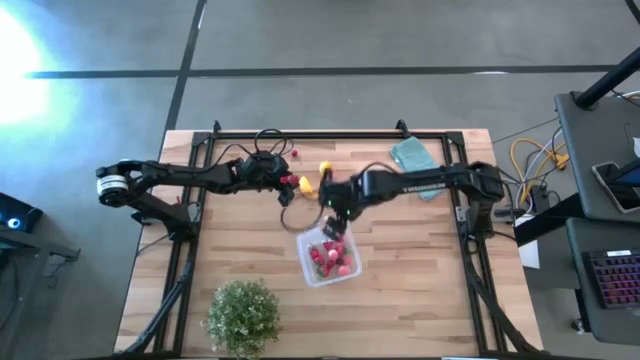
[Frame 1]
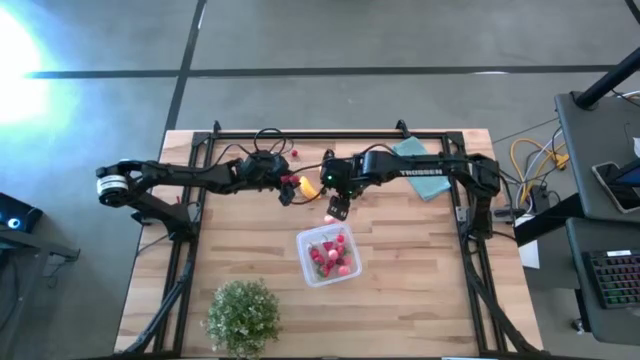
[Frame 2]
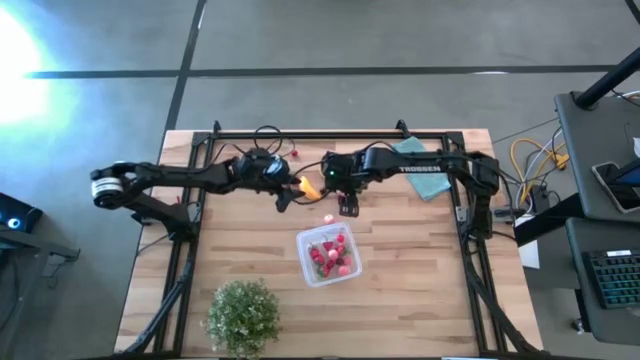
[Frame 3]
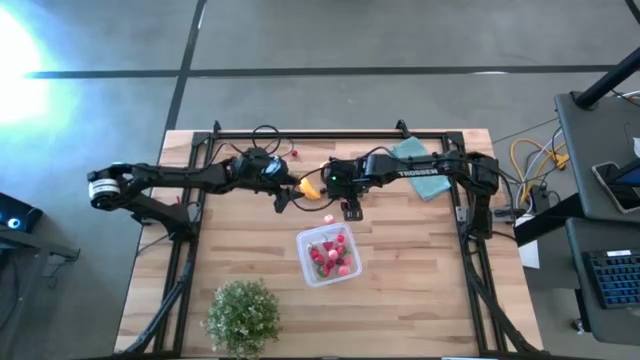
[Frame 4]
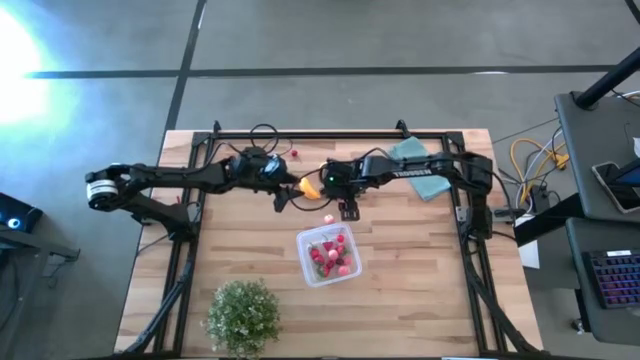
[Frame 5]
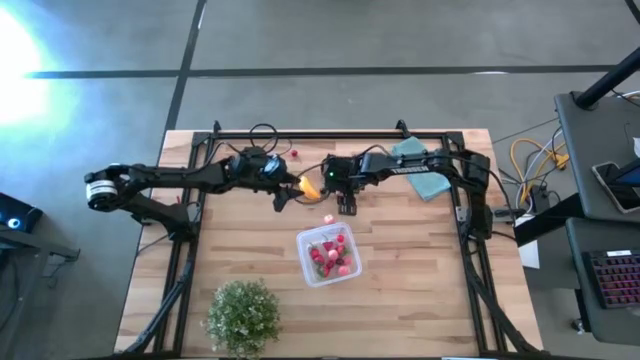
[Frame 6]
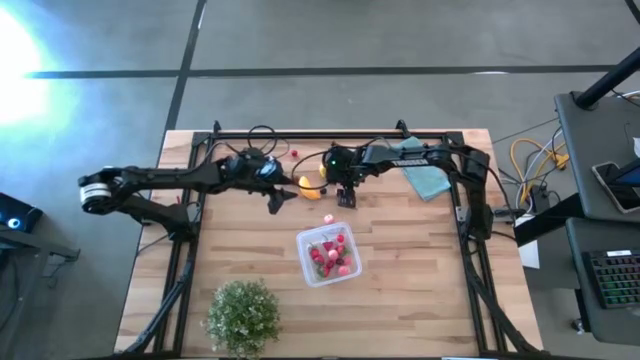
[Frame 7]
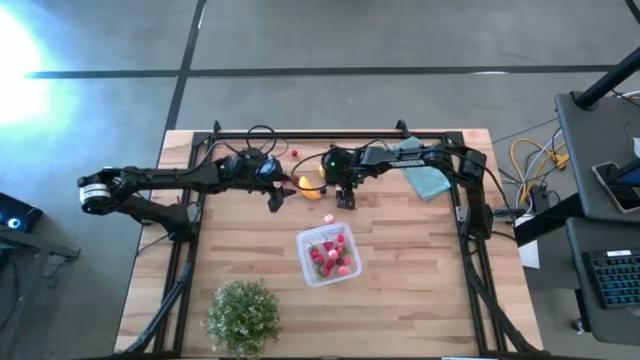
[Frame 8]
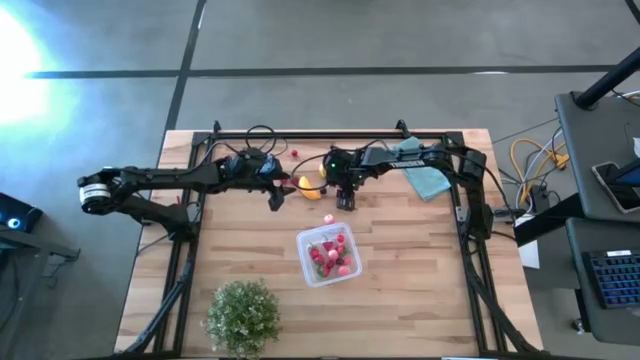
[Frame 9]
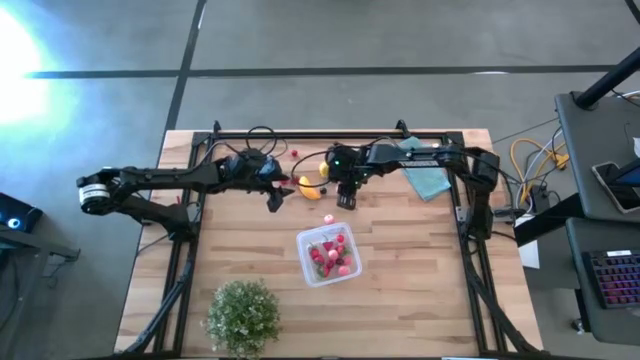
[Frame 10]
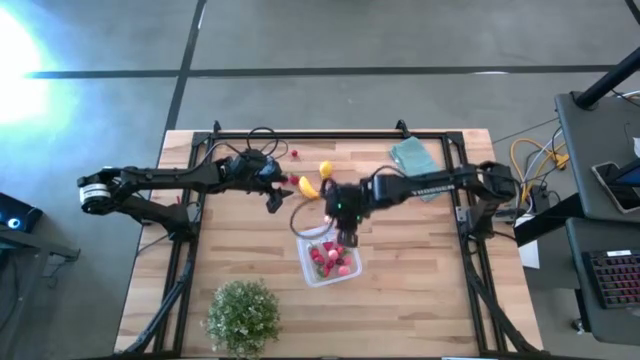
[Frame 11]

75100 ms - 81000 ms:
Task: Pick and placing Produce into tupperware
Put the peach into the transparent bin

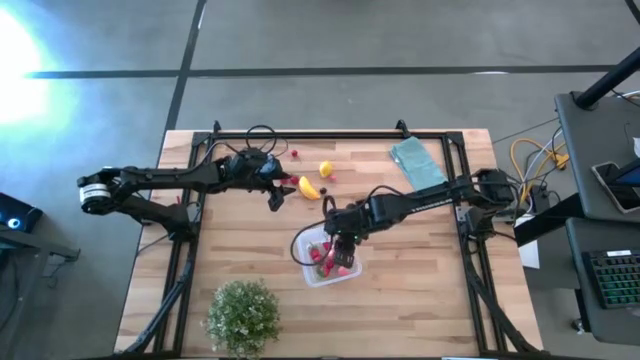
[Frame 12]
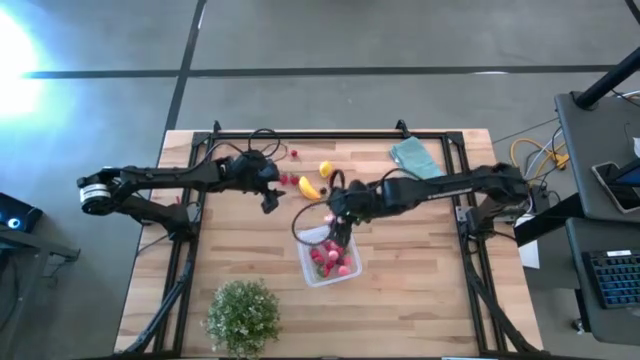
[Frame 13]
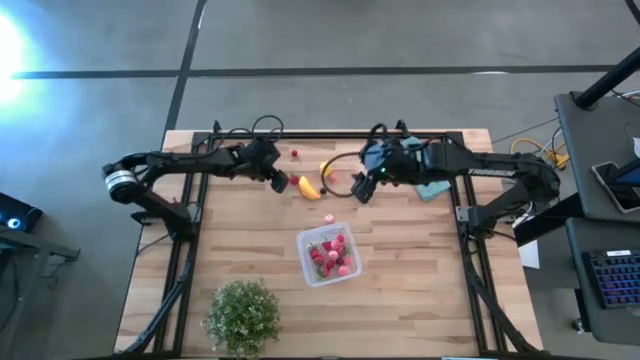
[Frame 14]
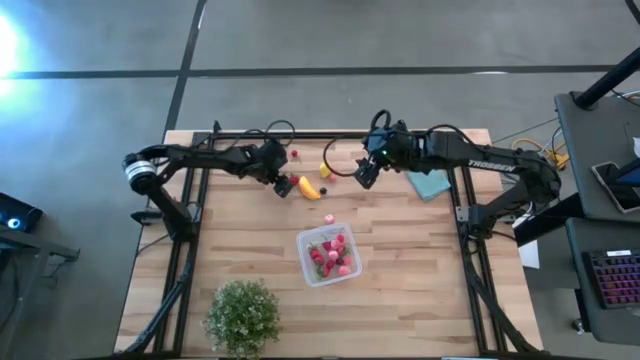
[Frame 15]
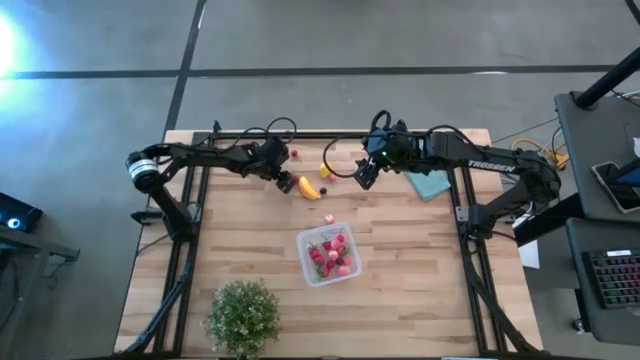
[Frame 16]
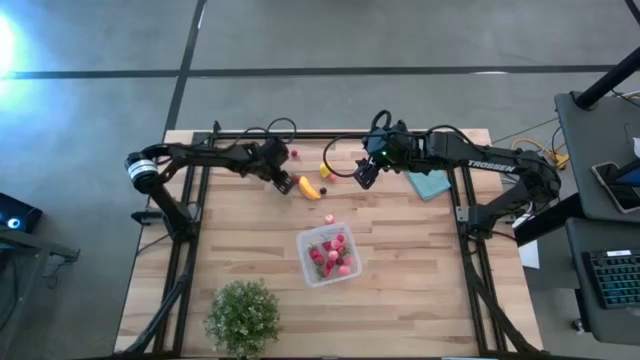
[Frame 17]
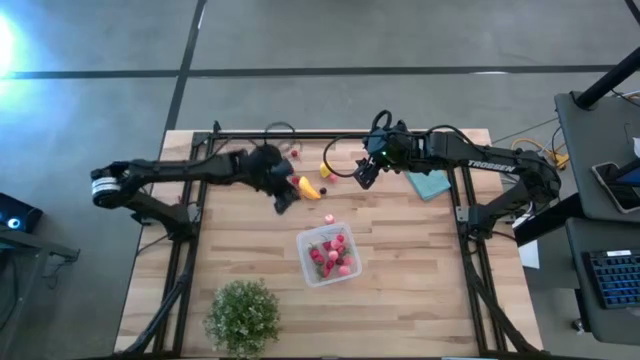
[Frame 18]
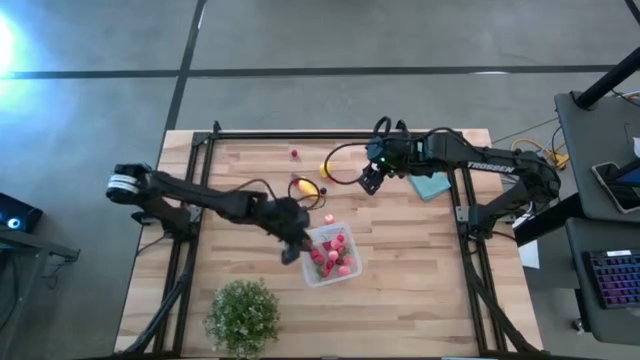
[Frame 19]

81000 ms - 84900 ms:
Put the strawberry into the transparent bin

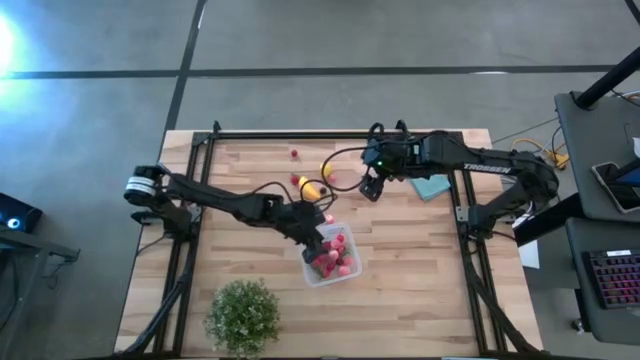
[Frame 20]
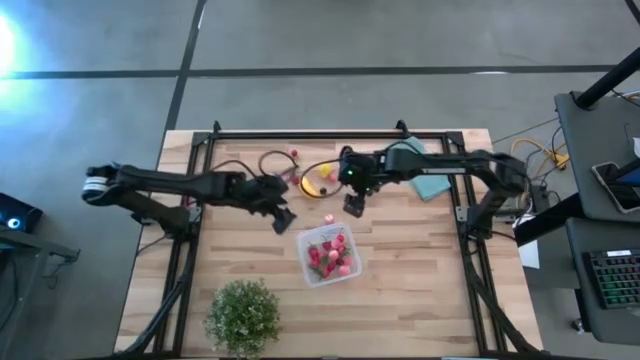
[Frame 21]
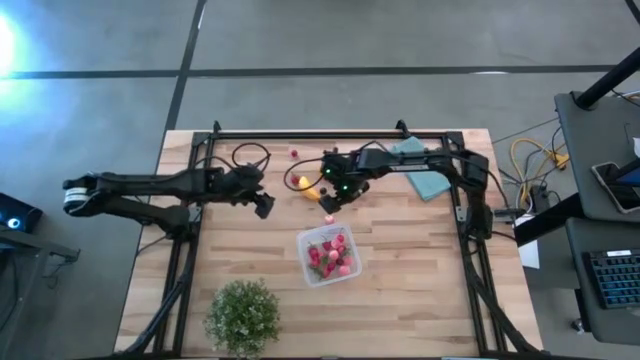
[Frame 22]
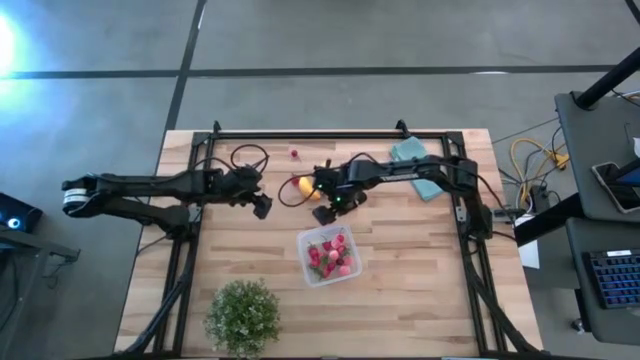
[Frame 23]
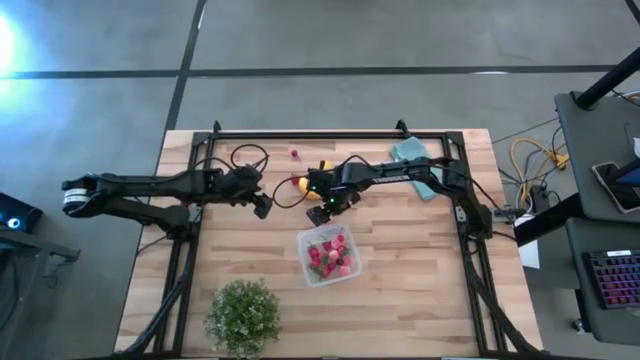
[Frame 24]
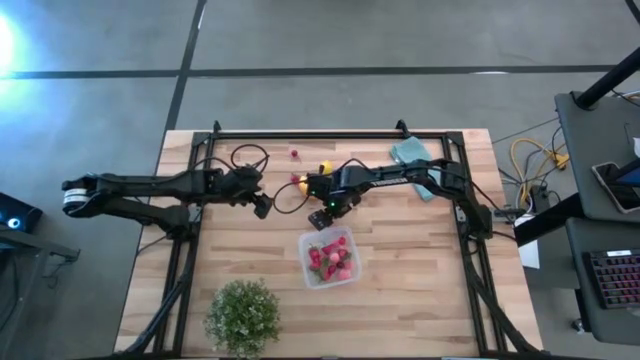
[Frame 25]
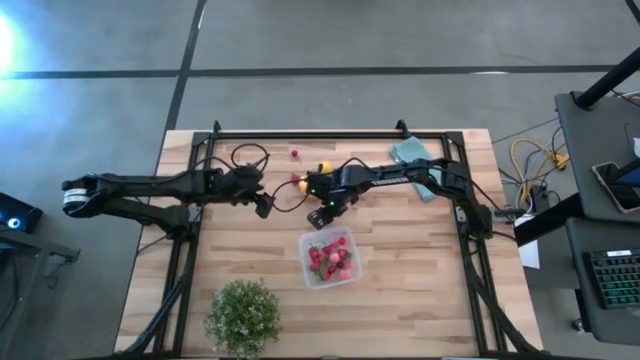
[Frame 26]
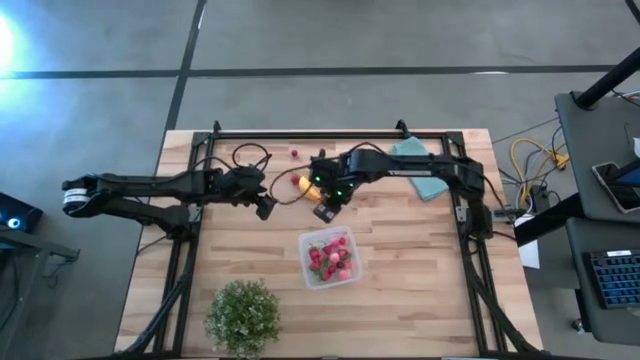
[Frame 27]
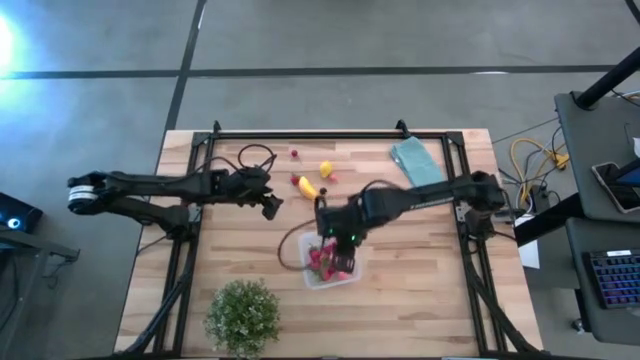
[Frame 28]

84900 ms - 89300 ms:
Put the peach into the transparent bin

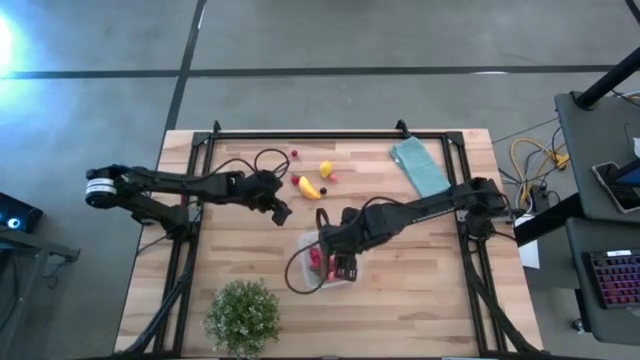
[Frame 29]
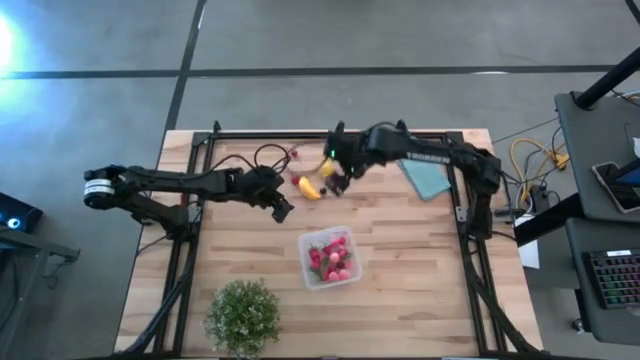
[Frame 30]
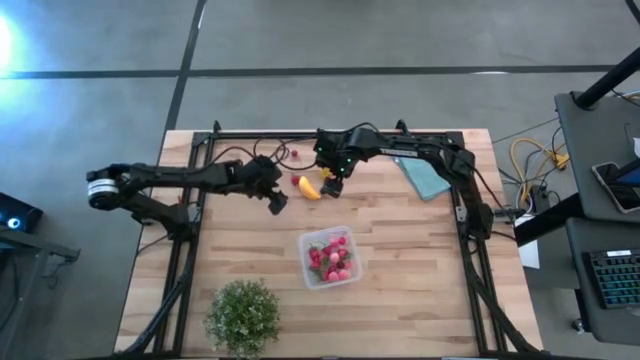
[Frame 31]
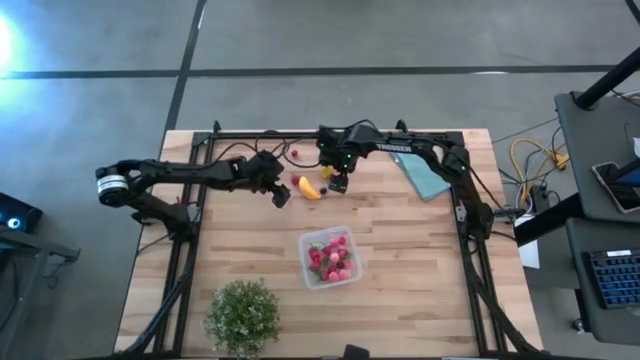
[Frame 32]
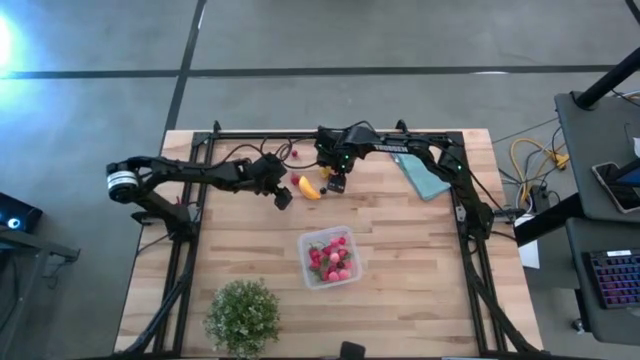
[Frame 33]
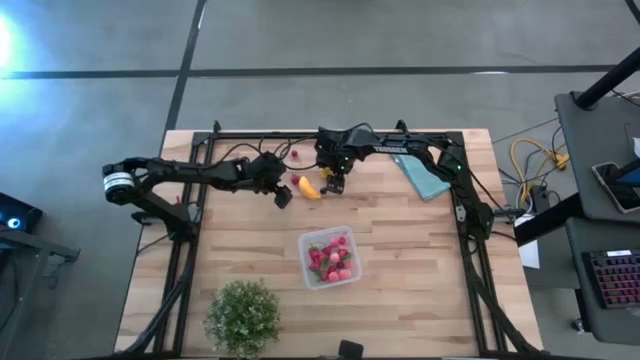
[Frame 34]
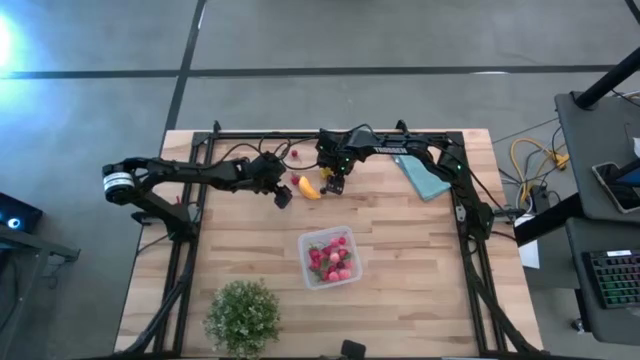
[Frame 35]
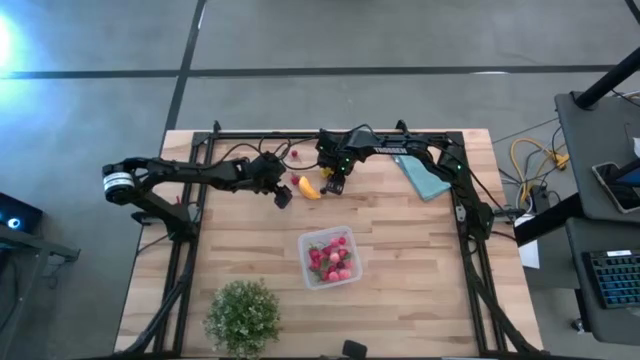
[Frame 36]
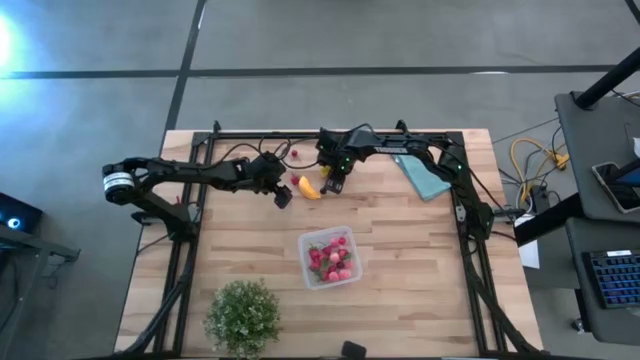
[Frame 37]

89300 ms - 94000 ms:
Put the peach into the transparent bin

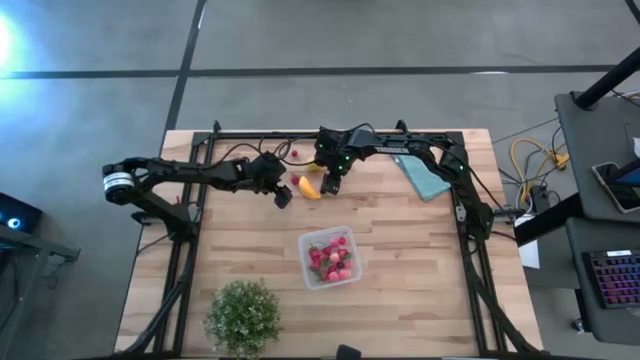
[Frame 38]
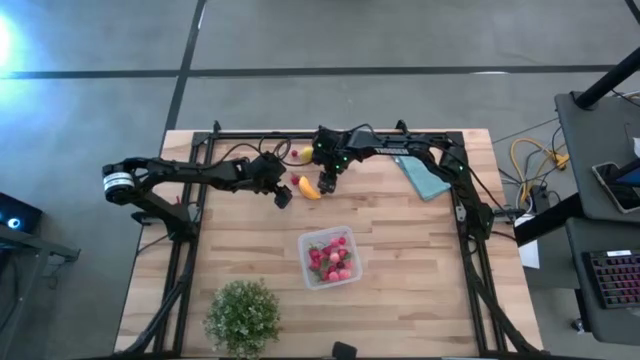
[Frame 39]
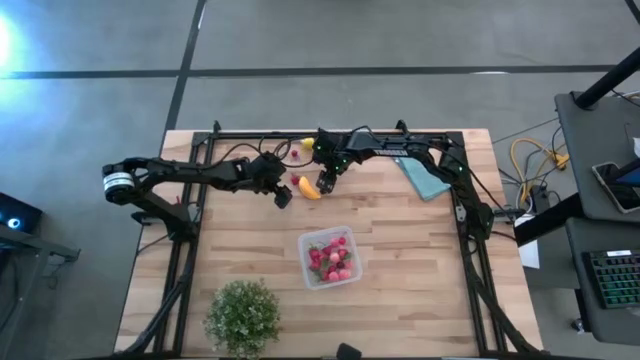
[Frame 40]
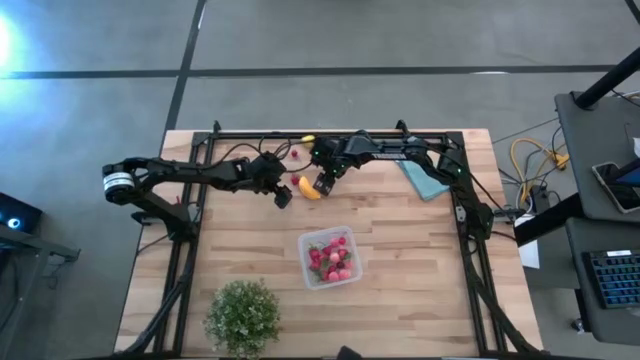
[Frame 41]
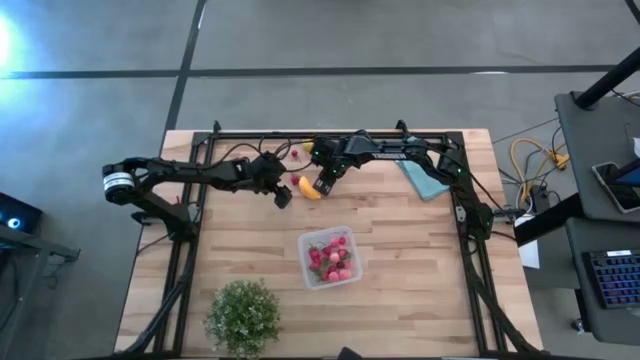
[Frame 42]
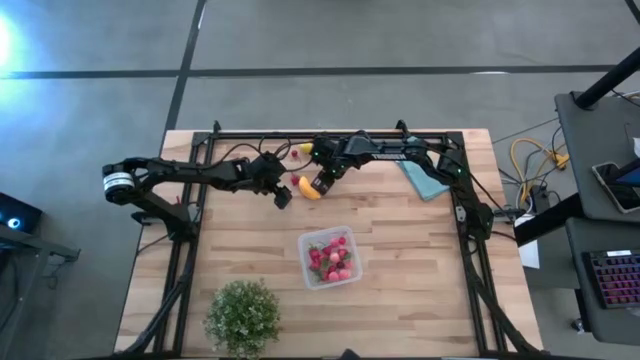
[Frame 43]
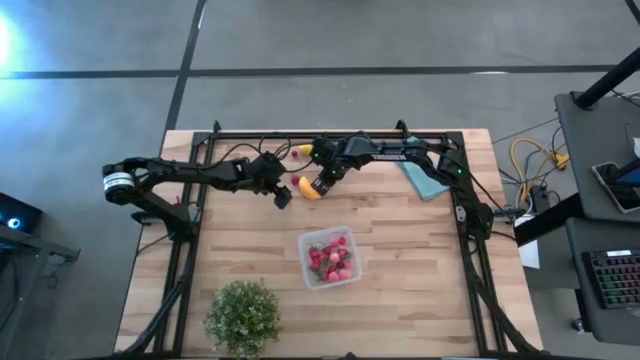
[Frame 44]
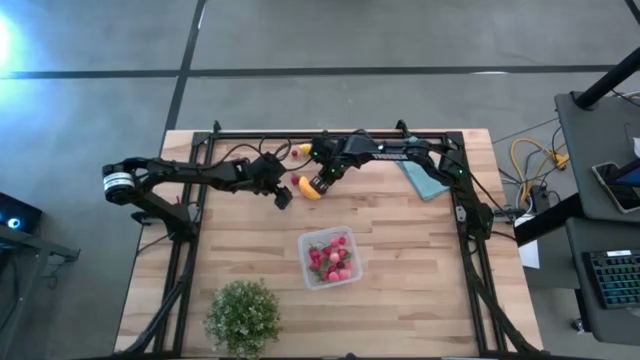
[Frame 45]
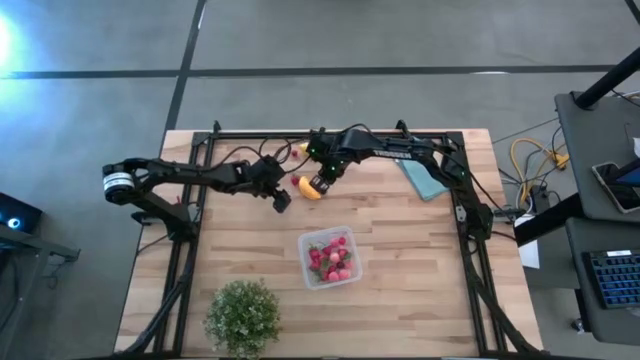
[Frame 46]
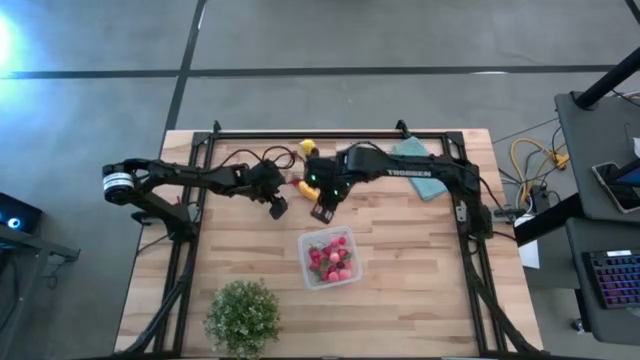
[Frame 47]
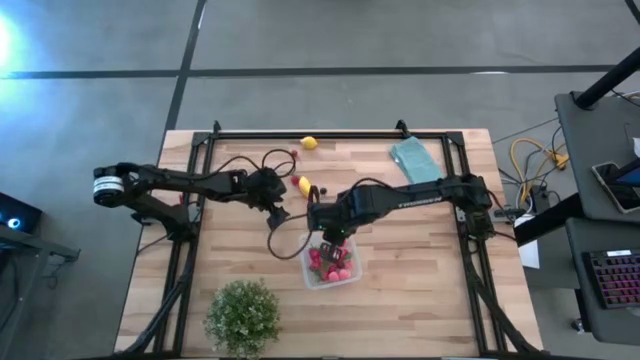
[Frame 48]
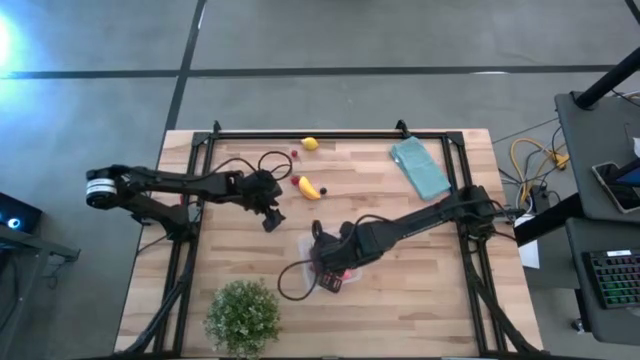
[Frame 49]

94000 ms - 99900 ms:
Put the peach into the transparent bin
